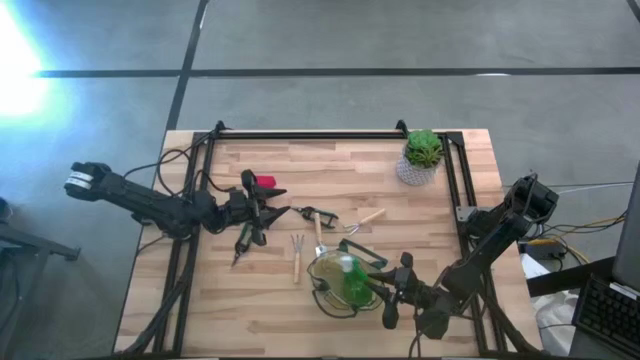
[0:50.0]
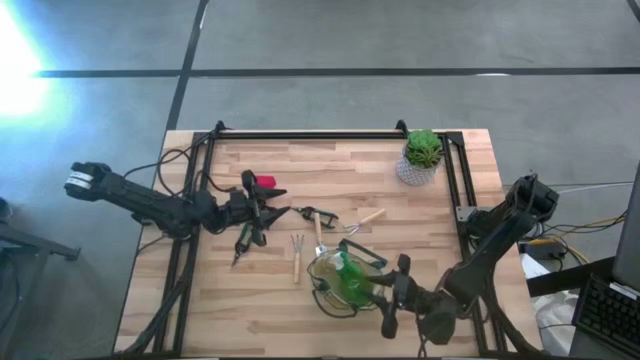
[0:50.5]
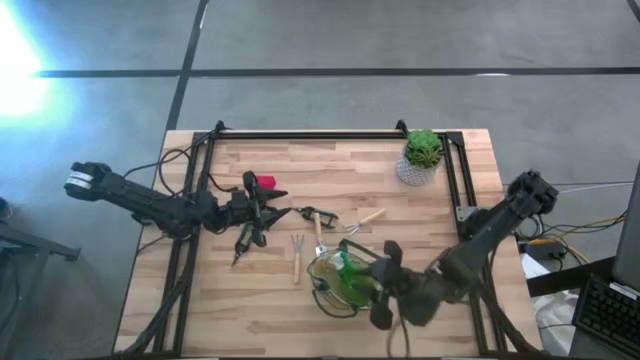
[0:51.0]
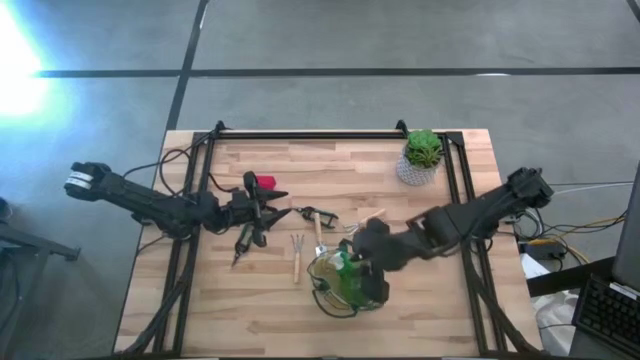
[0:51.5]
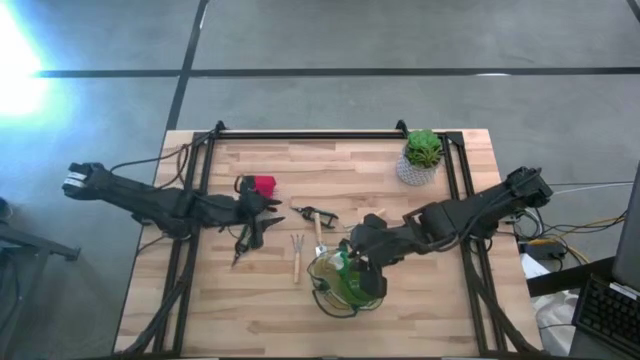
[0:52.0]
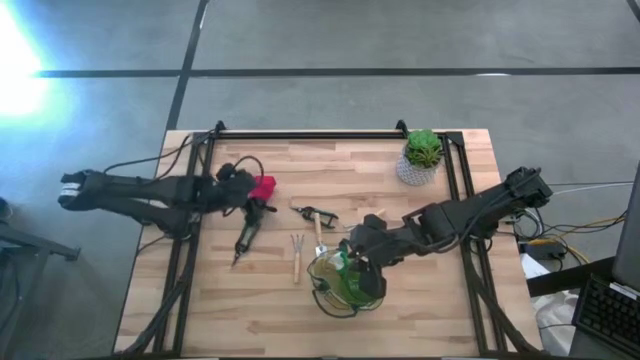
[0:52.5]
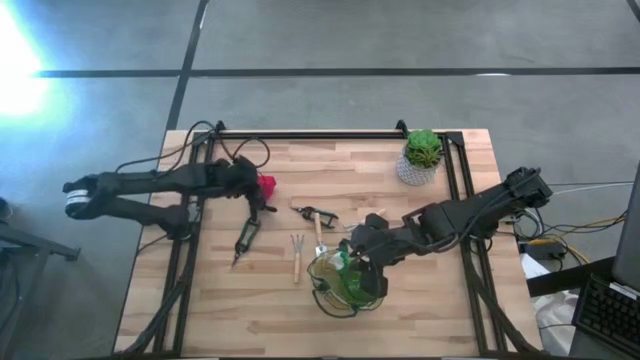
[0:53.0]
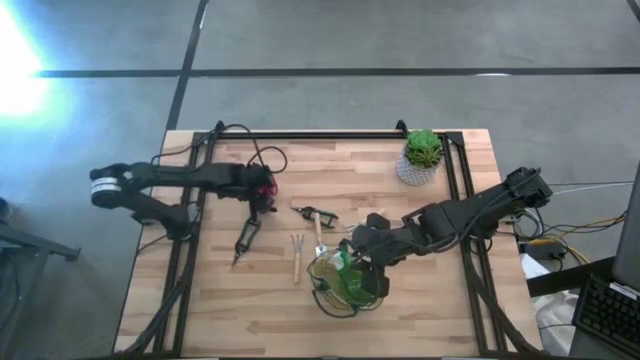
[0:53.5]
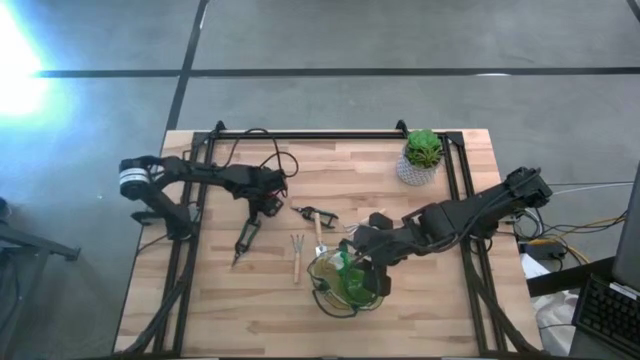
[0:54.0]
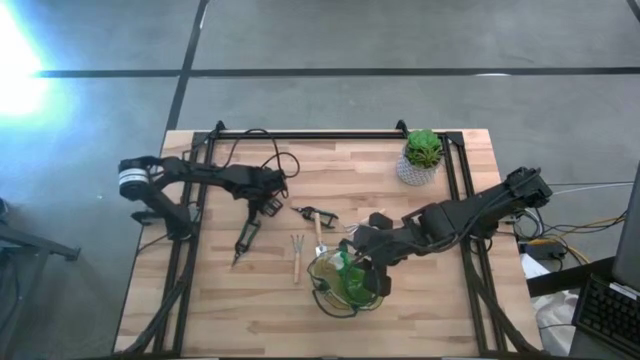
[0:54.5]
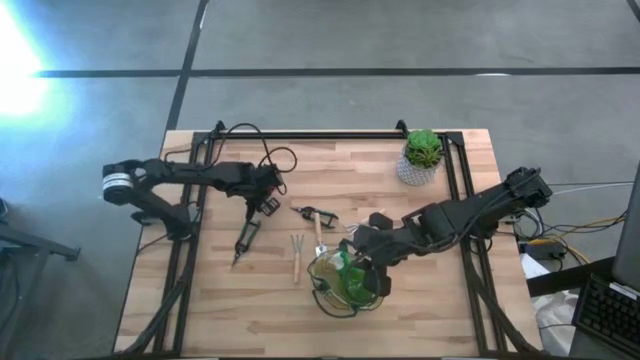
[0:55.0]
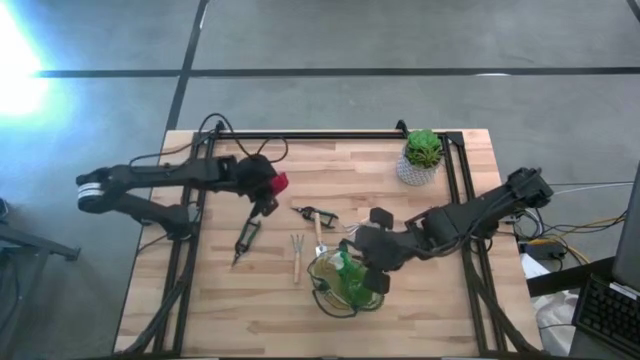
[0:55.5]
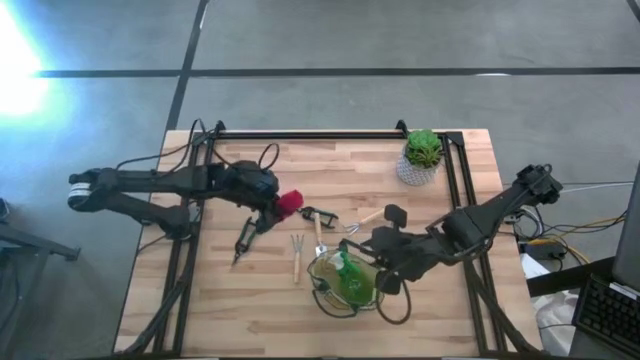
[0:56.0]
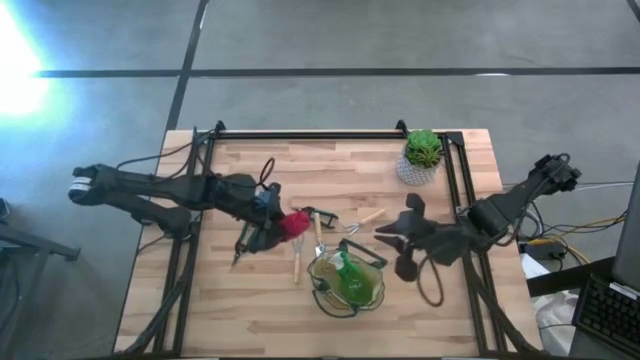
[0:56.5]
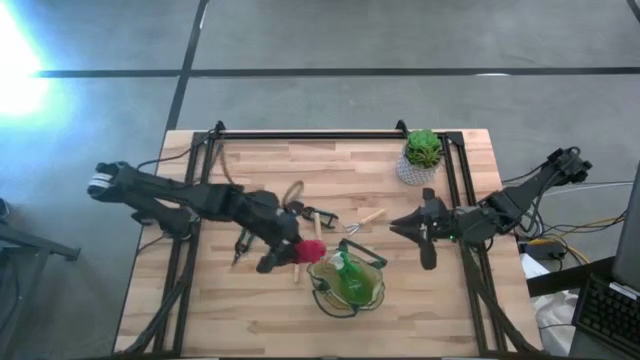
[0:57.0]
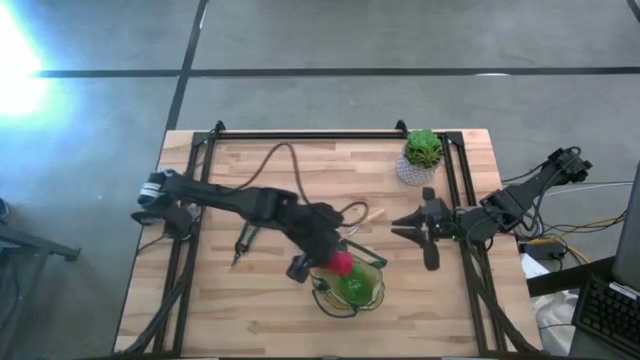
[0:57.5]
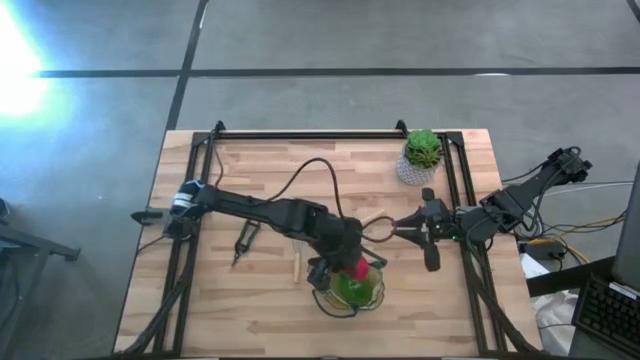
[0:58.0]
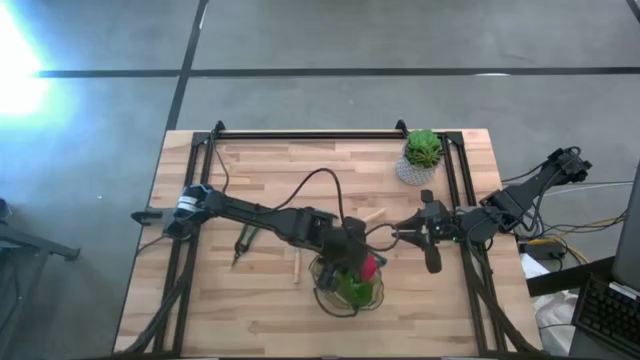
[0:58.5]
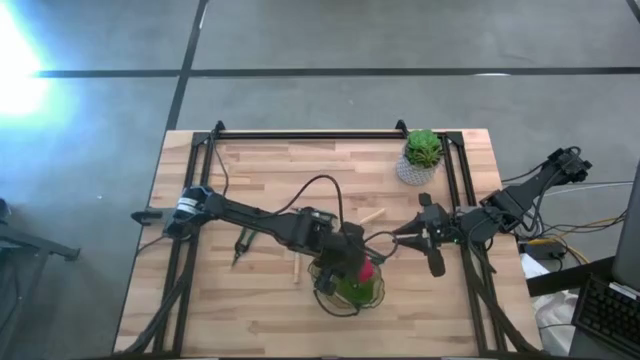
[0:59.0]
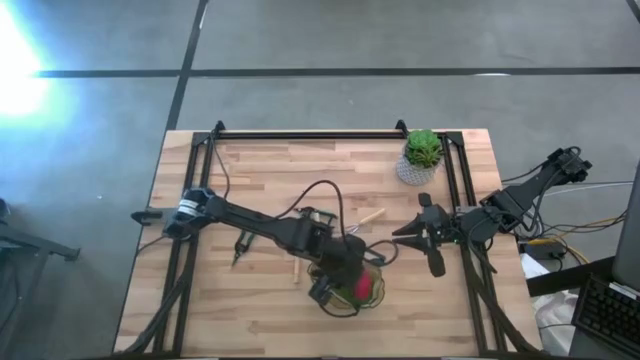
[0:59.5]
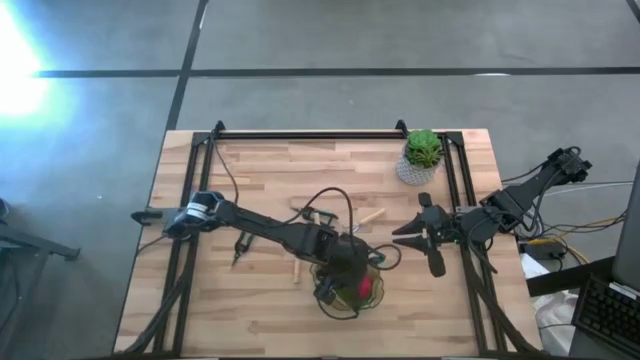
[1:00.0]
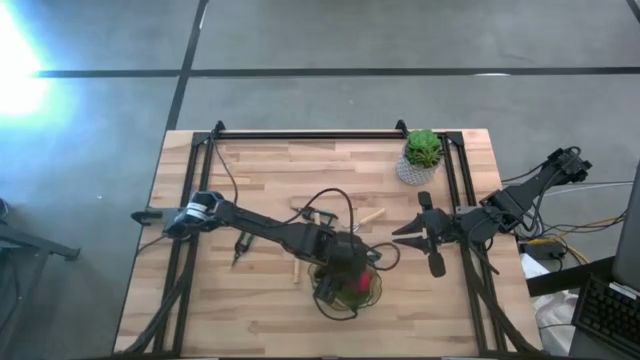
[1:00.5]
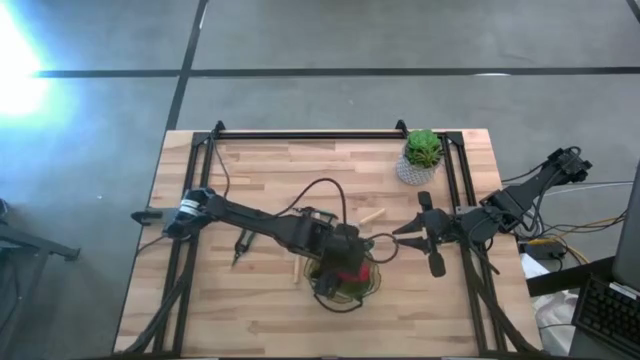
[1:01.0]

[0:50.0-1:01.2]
Task: Pick & Place Garden tools in Gardening bag
Put the red gardening gloves into the white gardening bag

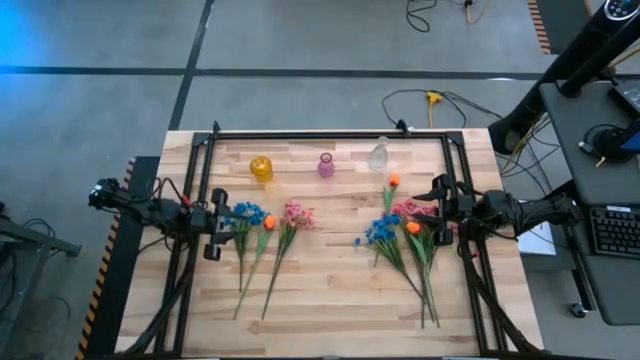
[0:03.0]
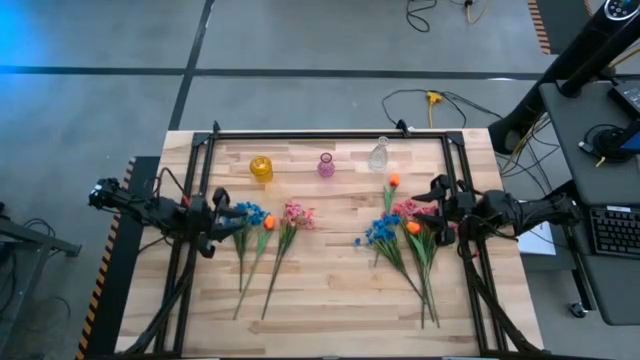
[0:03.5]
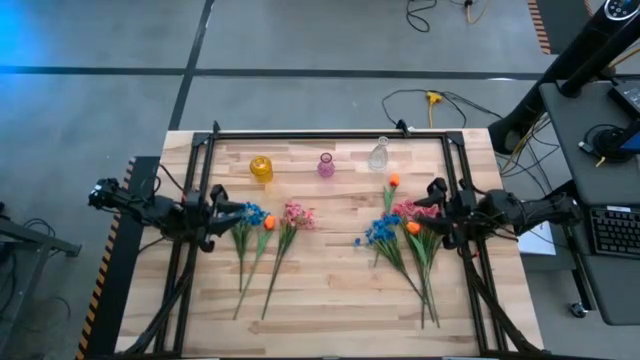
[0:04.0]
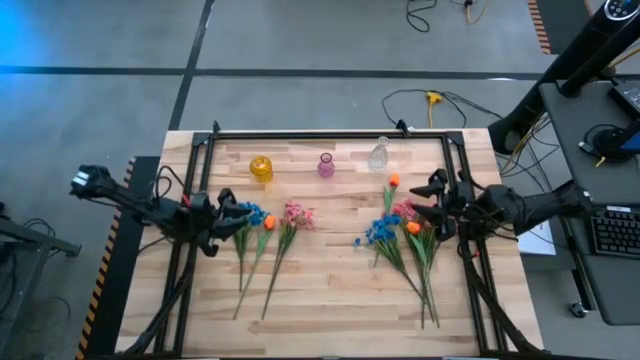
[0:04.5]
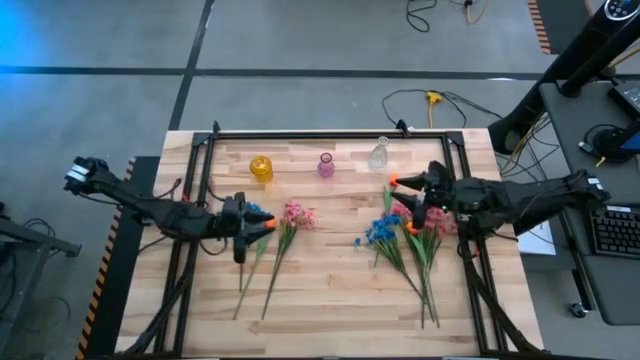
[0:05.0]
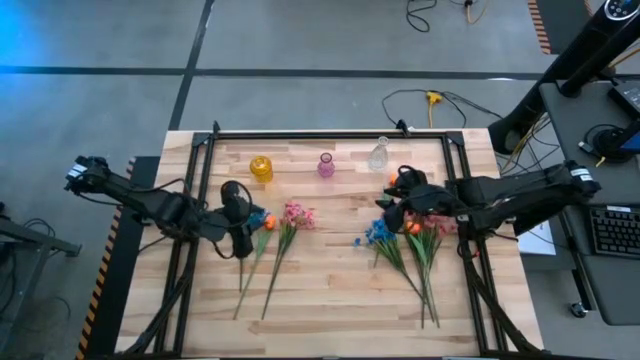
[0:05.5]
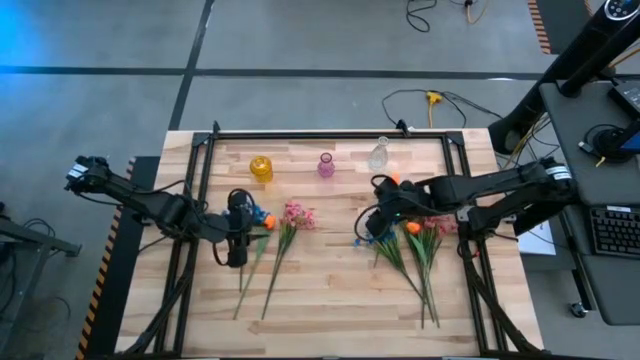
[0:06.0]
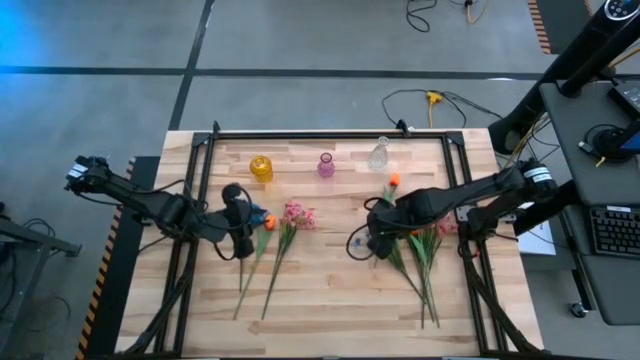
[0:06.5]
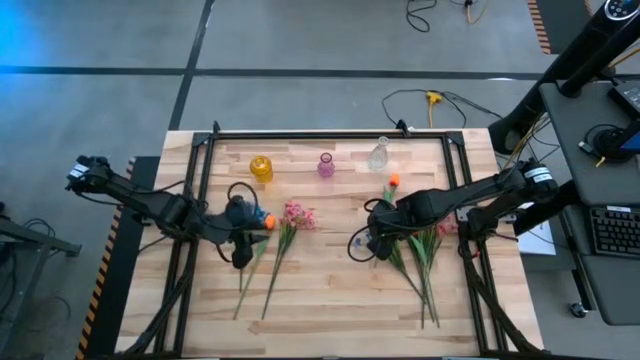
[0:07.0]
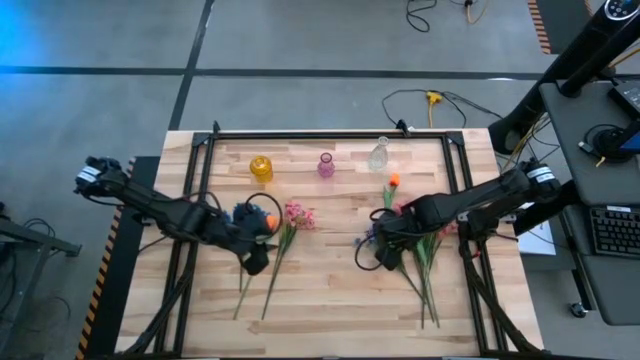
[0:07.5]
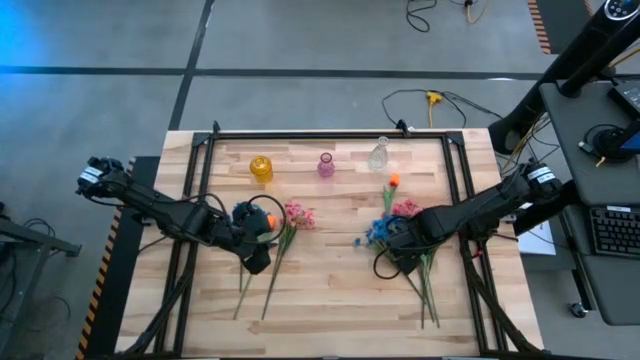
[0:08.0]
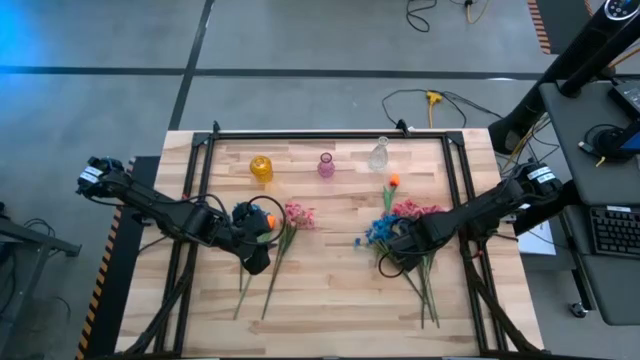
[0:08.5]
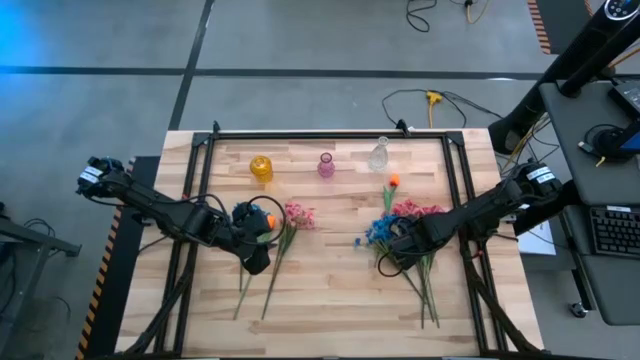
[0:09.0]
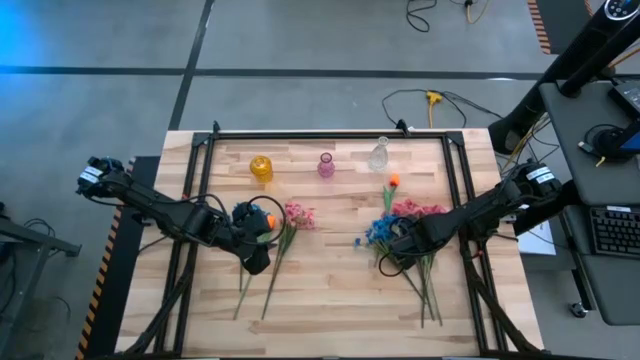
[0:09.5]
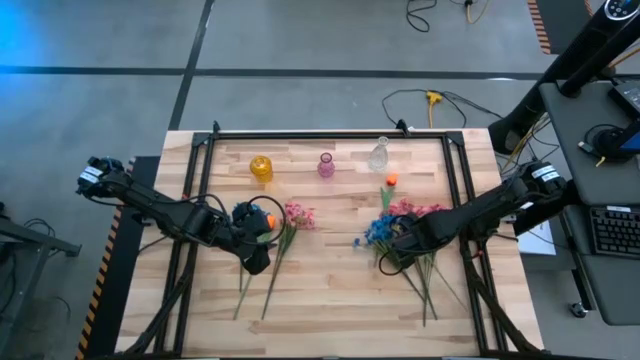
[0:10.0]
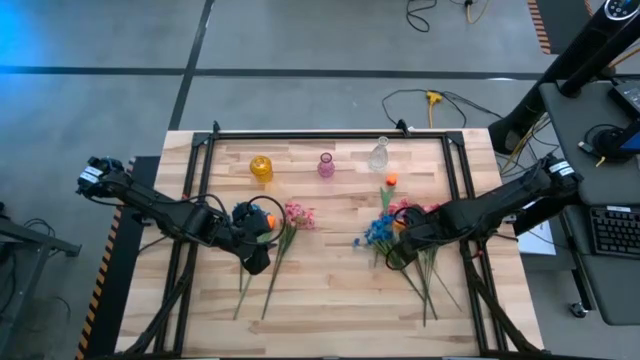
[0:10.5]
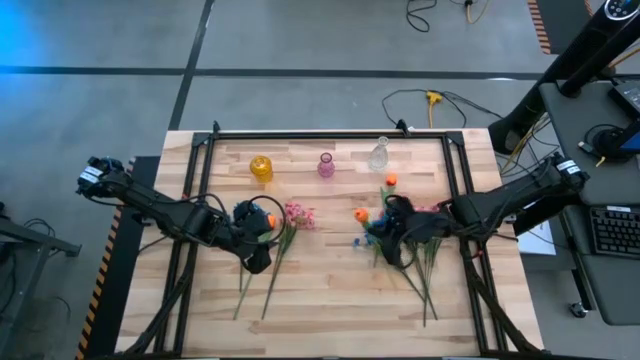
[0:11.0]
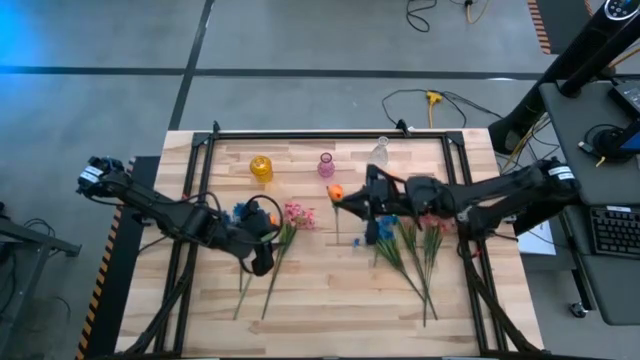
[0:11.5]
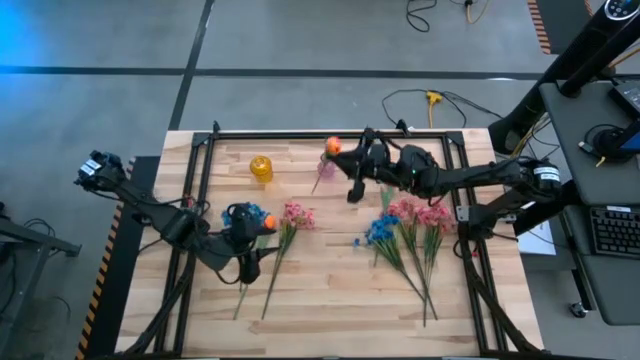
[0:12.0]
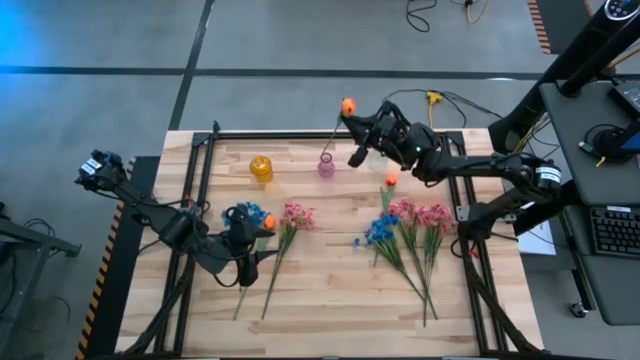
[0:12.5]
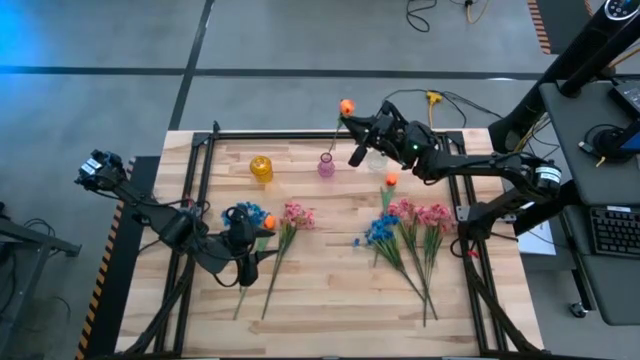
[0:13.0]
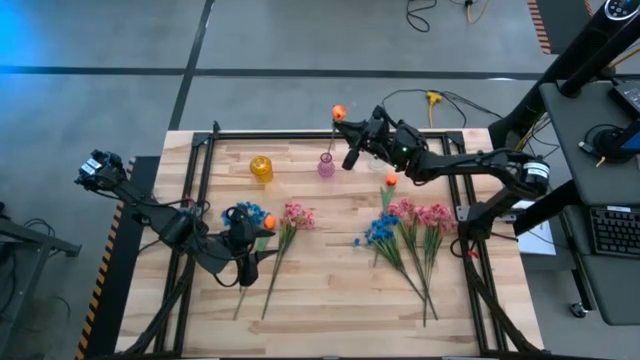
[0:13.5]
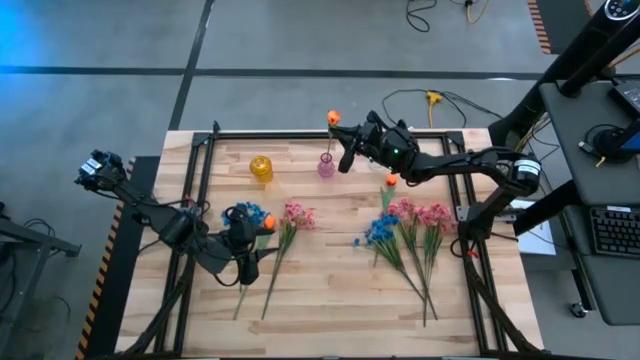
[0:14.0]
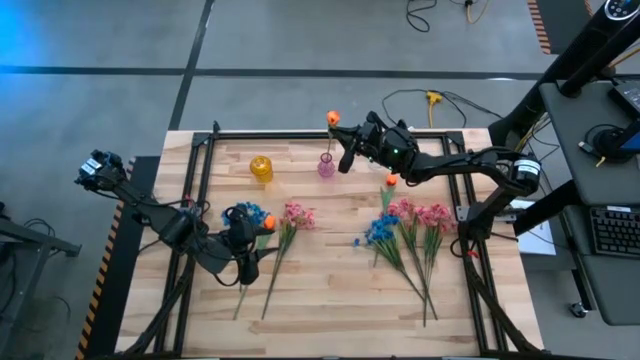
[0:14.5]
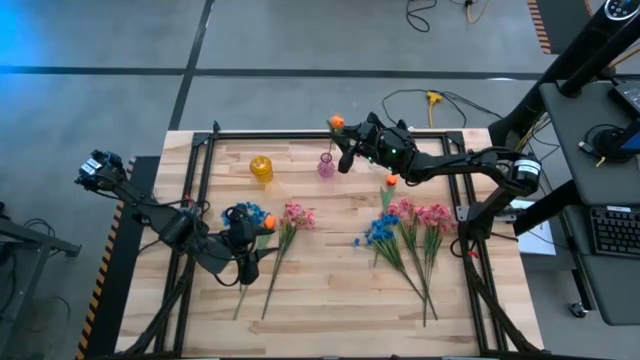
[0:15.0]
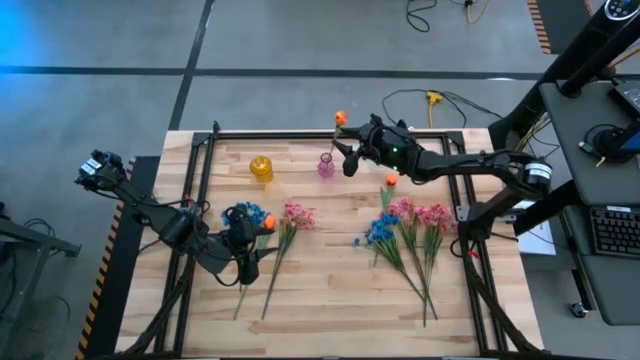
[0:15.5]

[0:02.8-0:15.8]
Task: Sort flowers into vase by color
Put the bottom right orange flower into the violet vase
